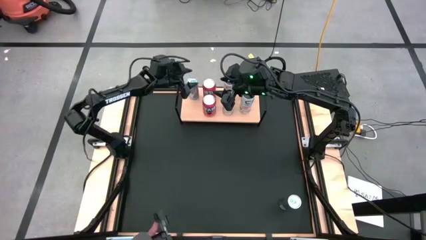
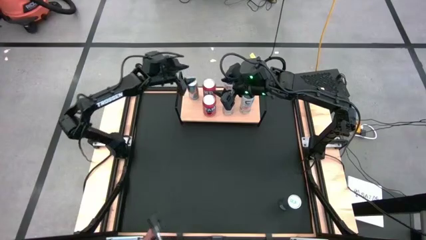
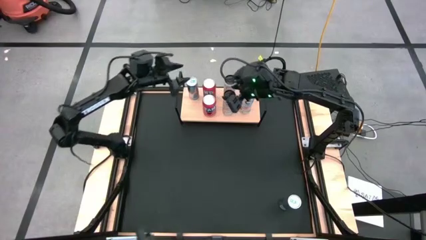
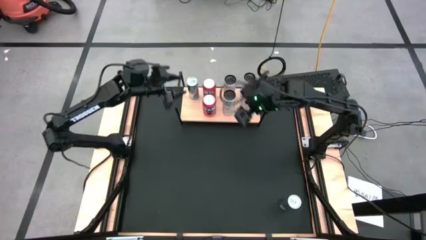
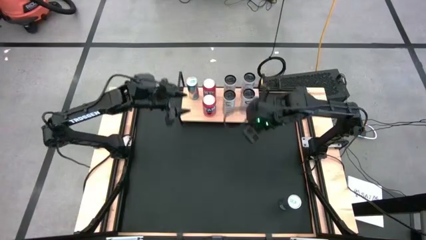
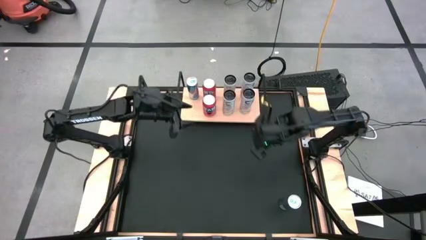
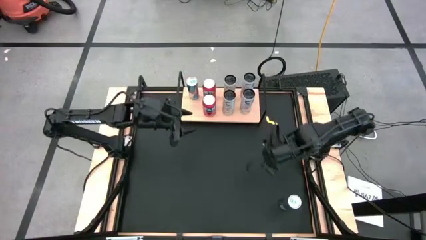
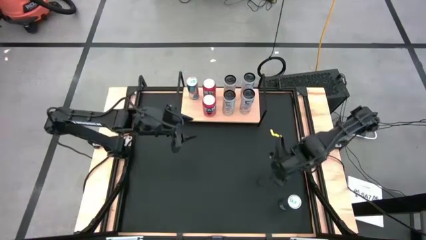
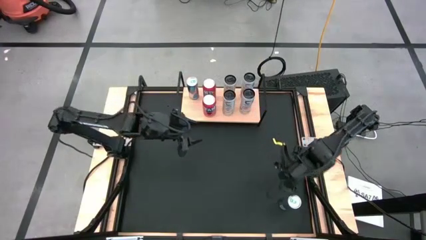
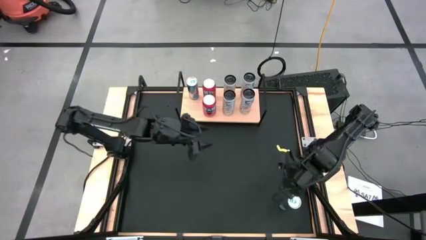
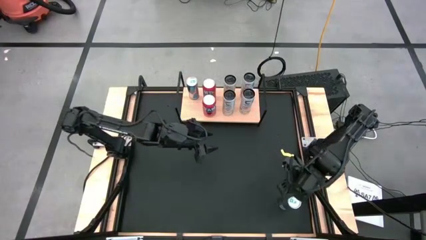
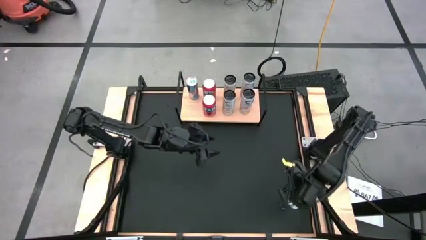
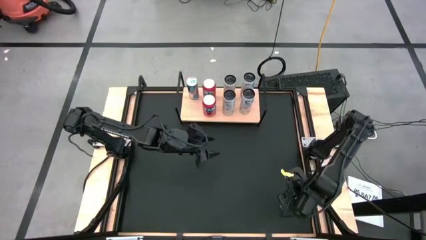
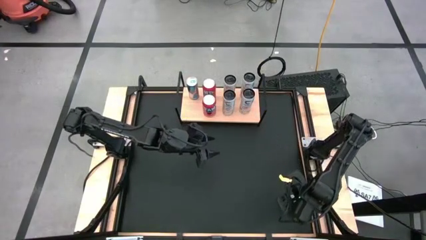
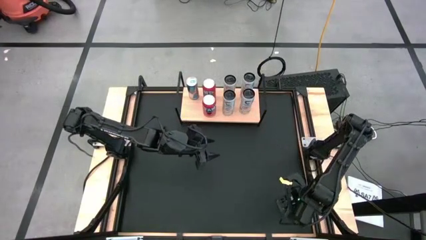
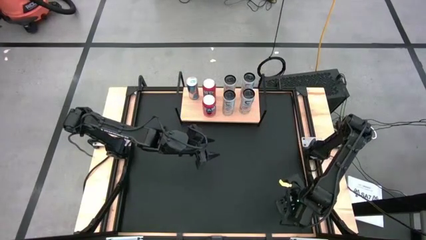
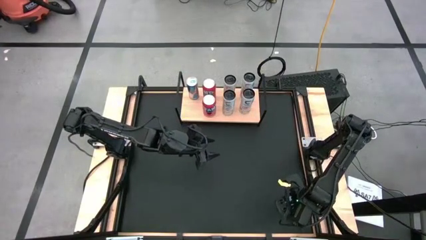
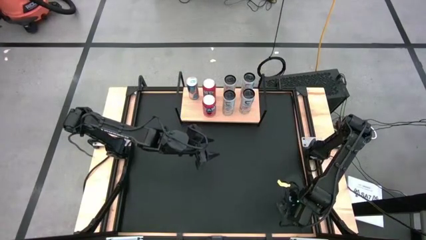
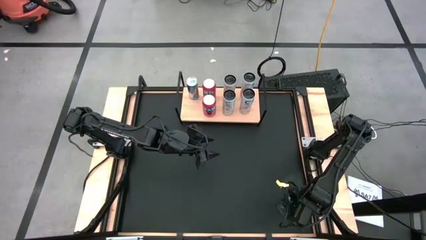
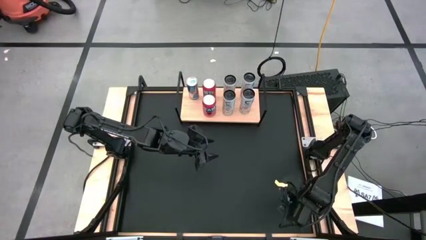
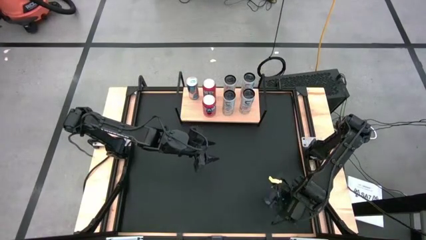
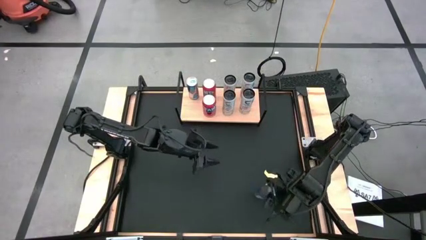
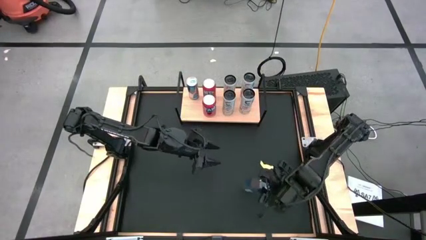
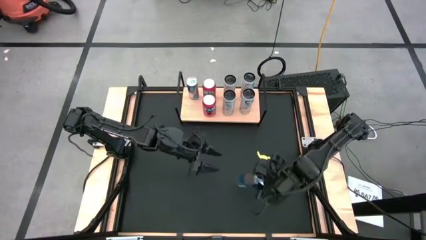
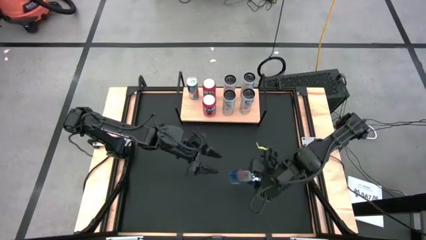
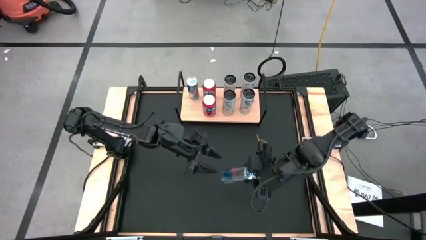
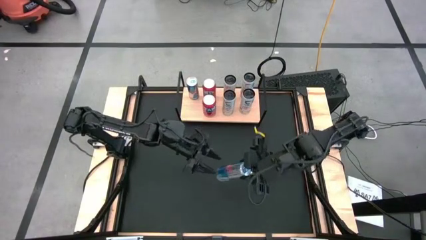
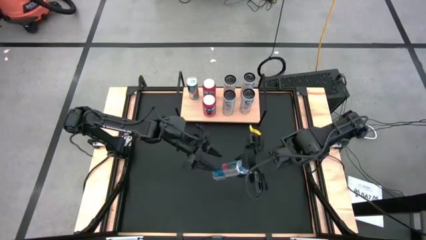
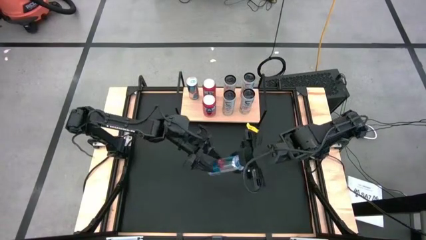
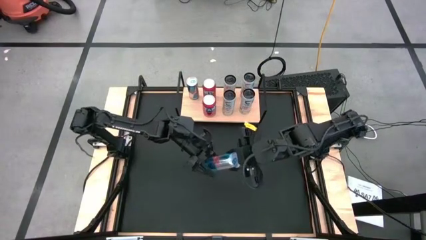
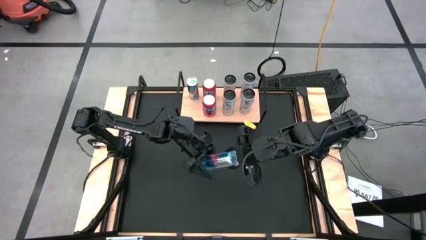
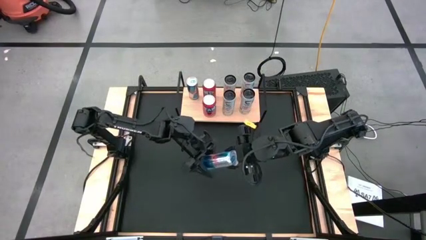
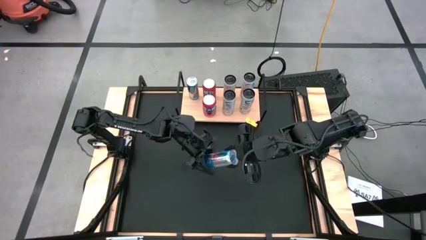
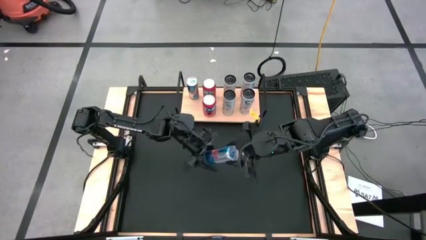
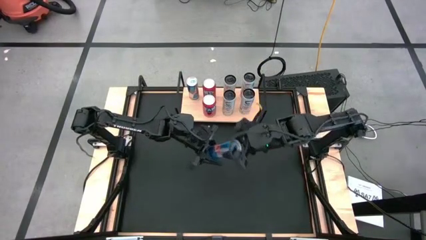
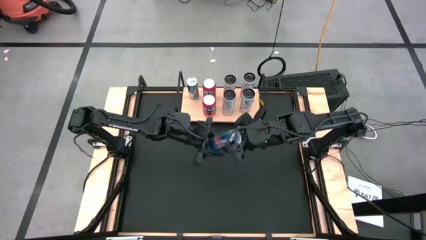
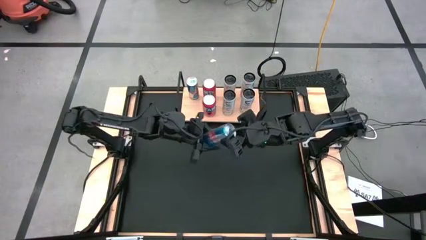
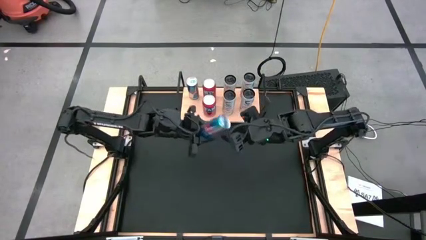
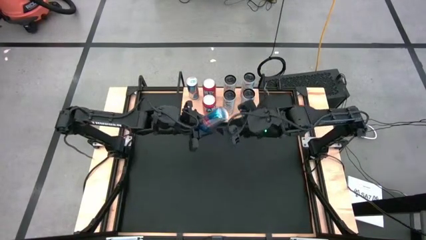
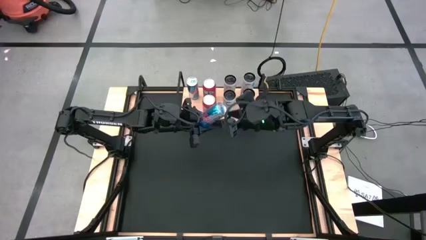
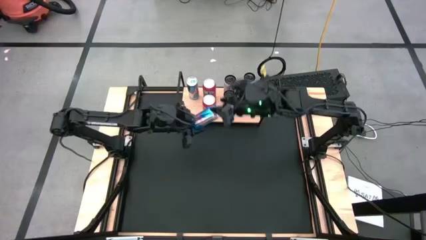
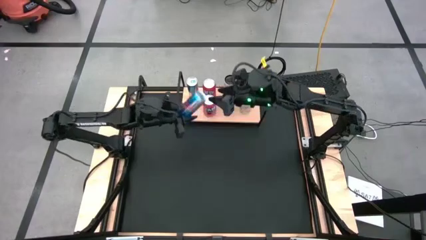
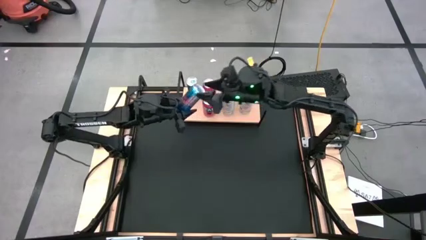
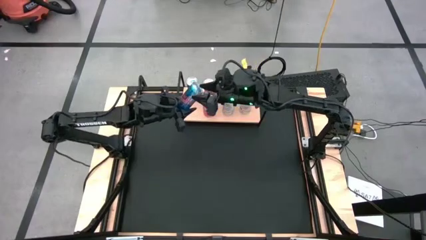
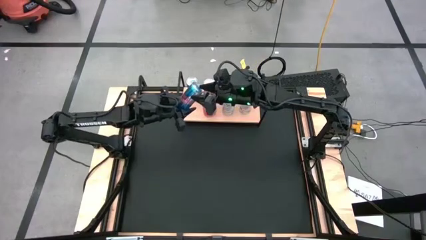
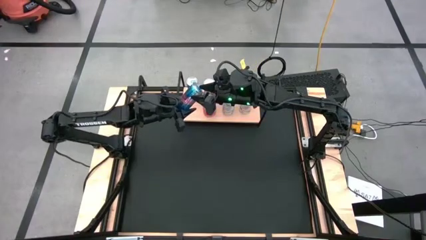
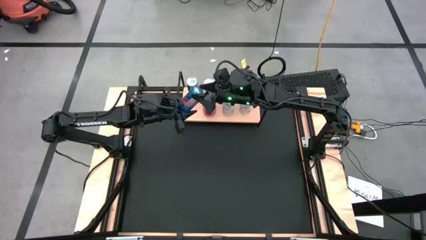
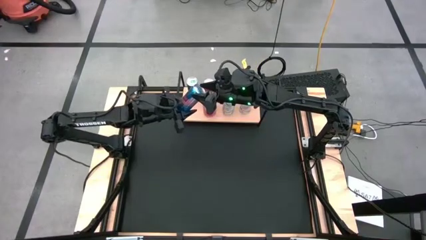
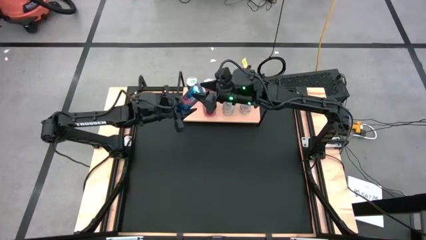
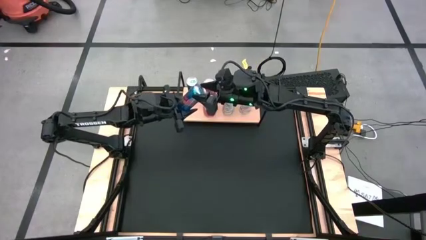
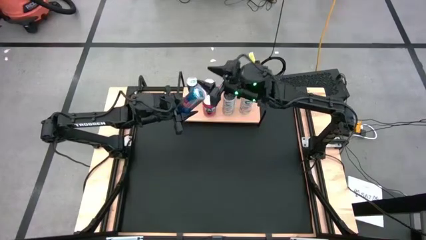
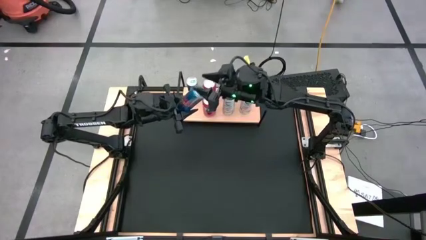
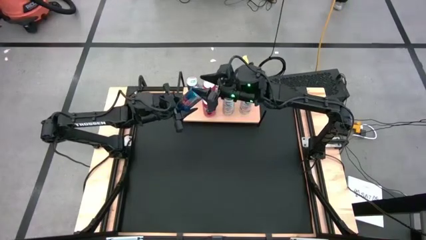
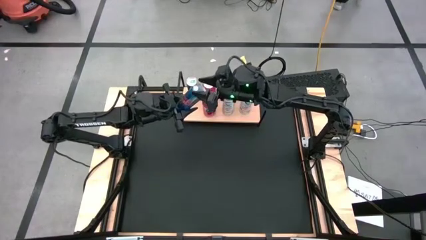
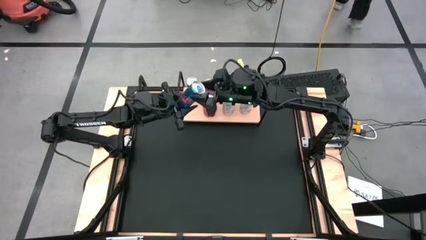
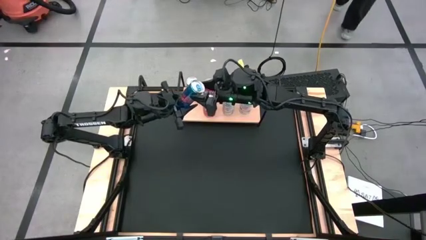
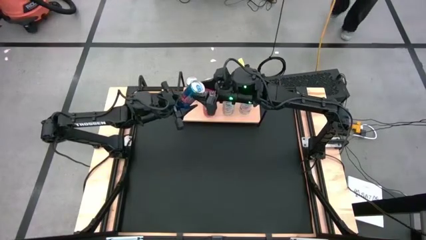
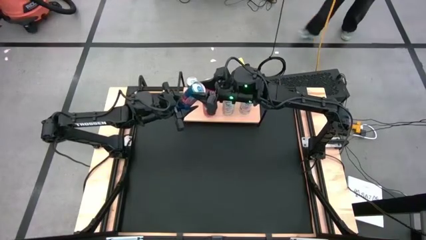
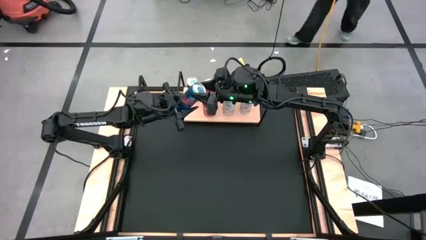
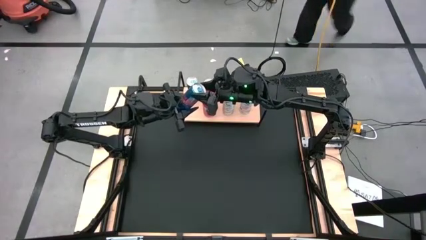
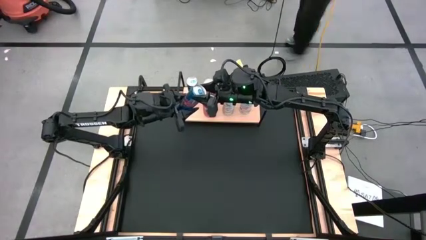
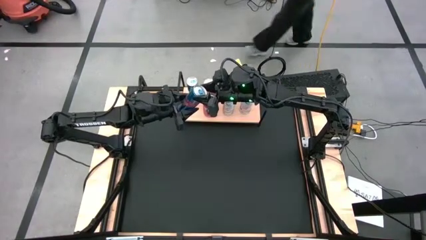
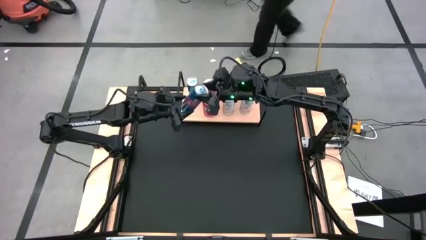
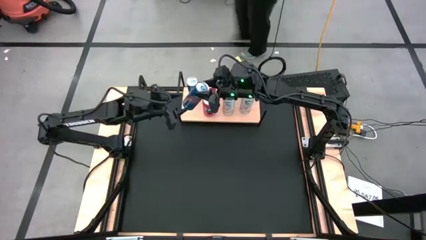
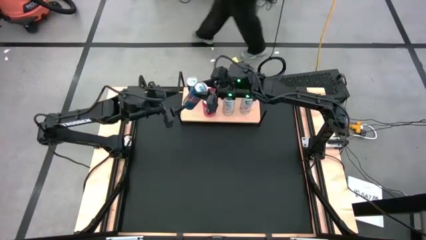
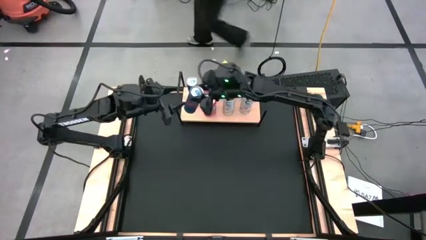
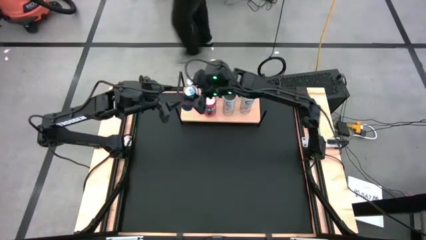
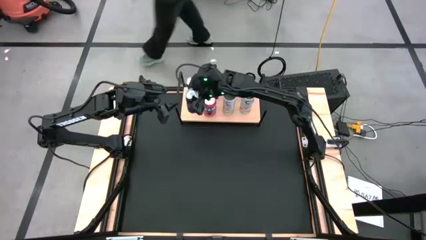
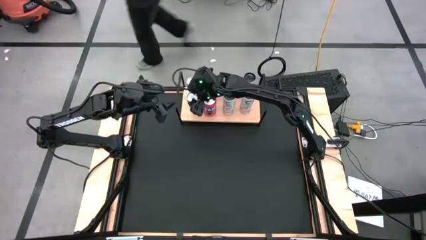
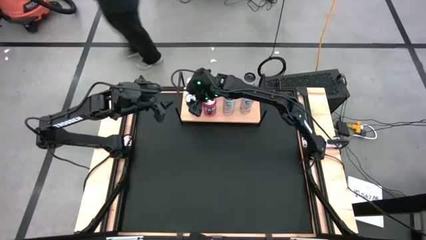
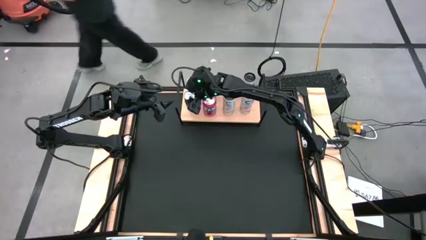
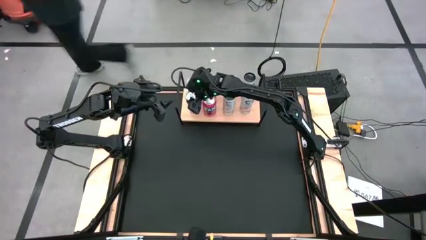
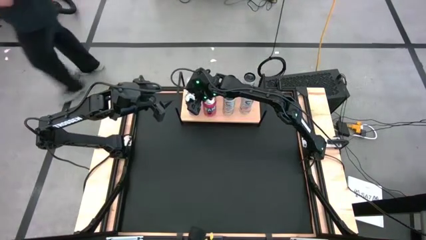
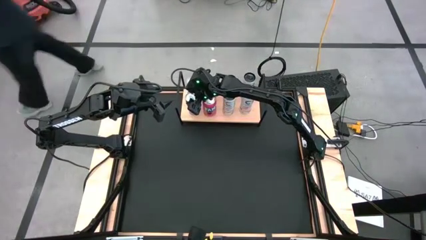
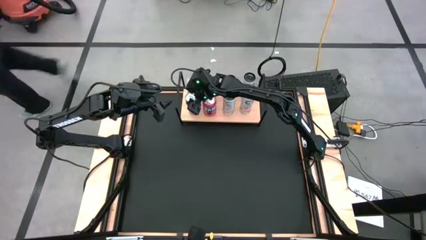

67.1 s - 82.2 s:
Task: Place canned beverage on shelf
Put the blue soda can on the shelf
